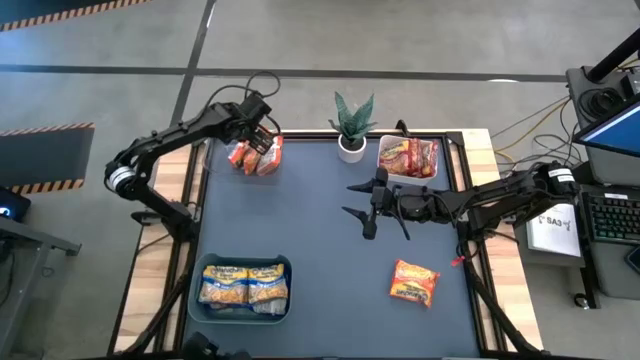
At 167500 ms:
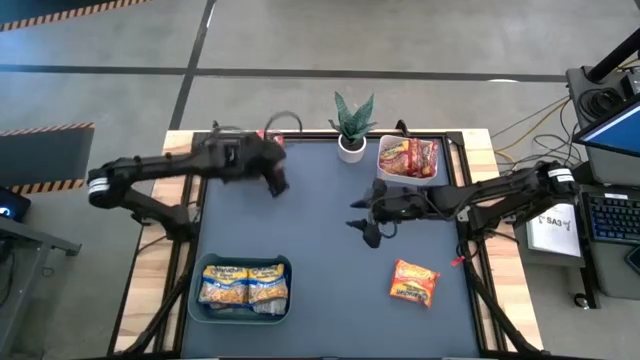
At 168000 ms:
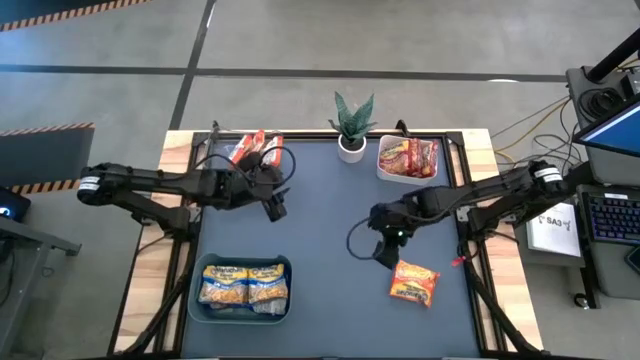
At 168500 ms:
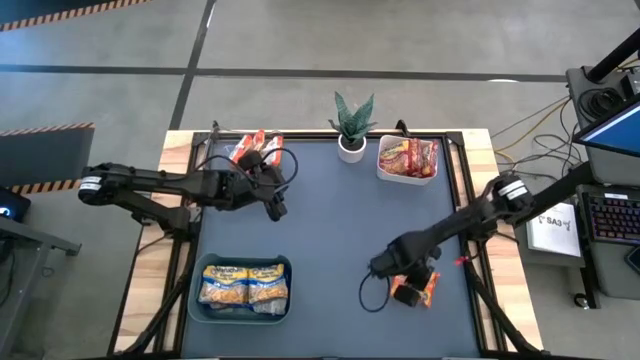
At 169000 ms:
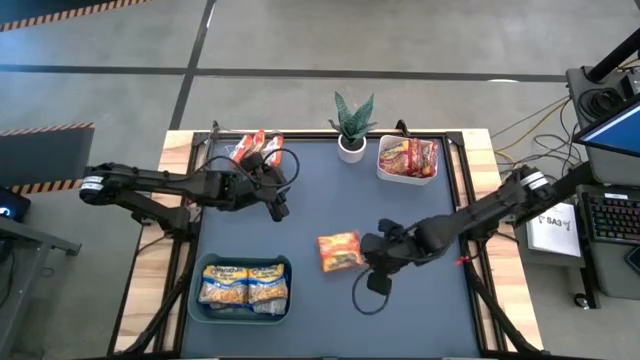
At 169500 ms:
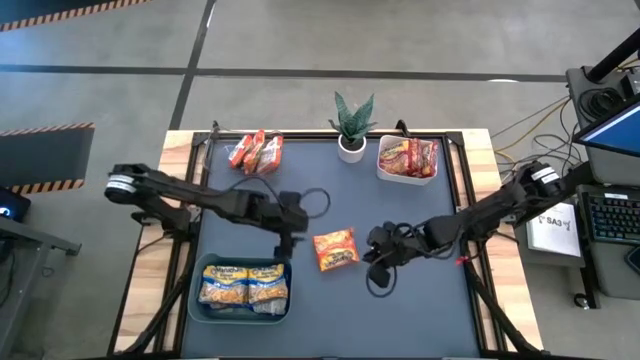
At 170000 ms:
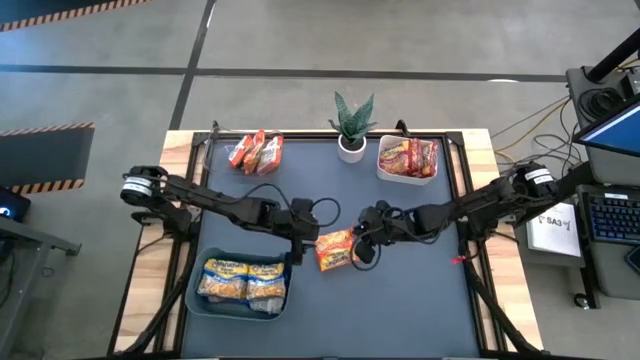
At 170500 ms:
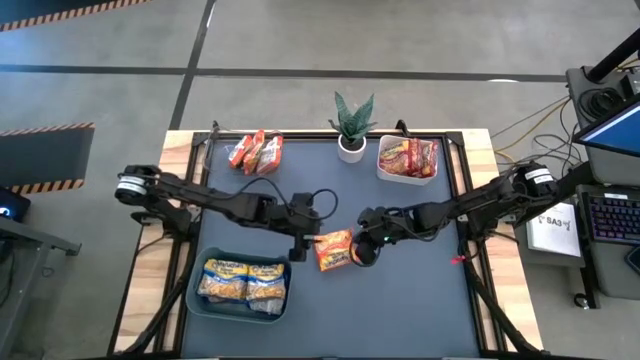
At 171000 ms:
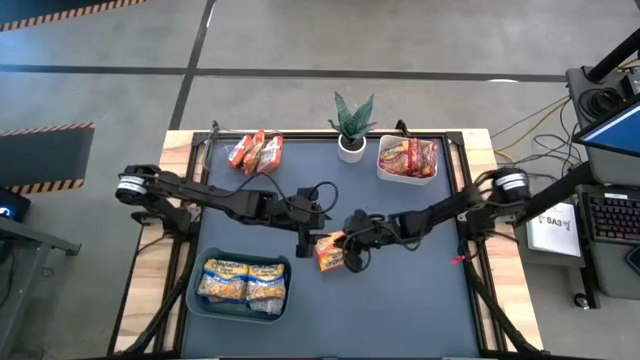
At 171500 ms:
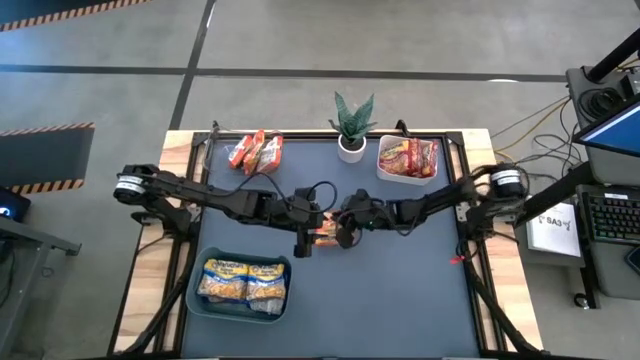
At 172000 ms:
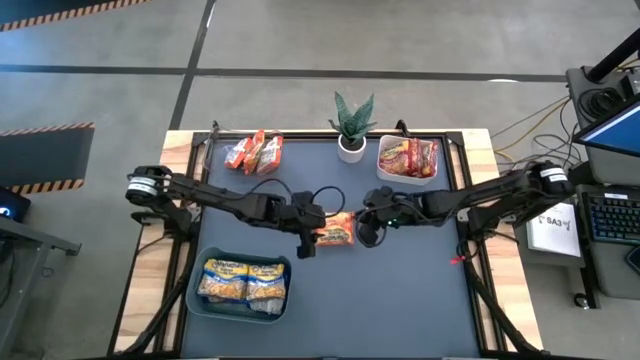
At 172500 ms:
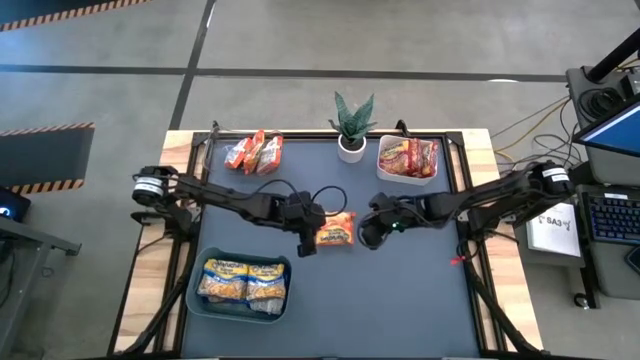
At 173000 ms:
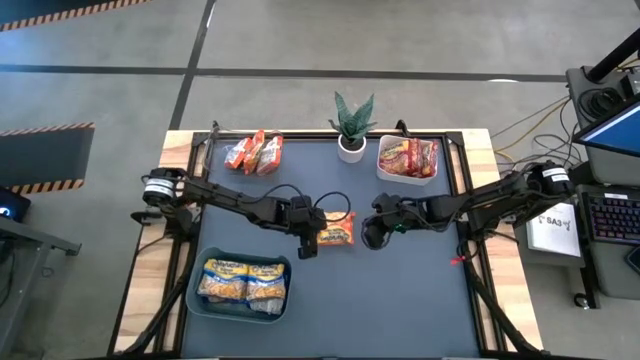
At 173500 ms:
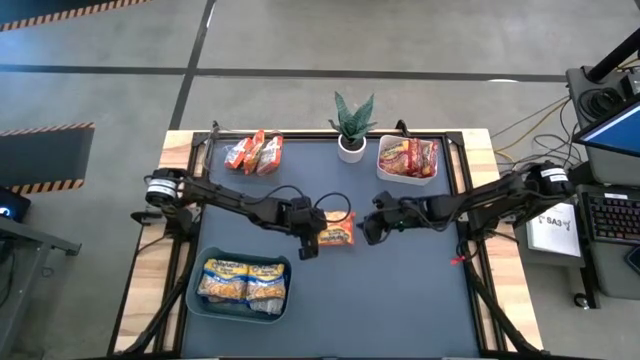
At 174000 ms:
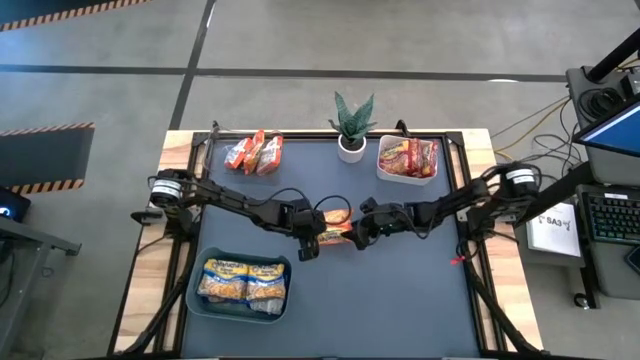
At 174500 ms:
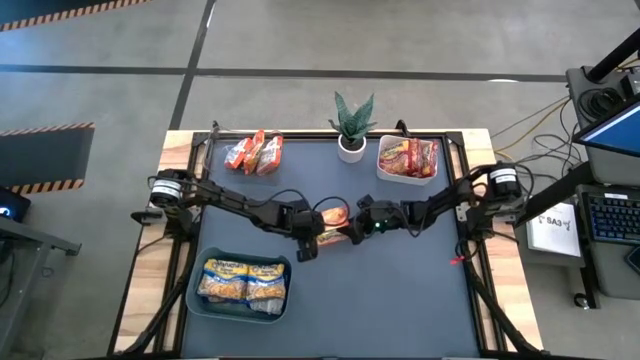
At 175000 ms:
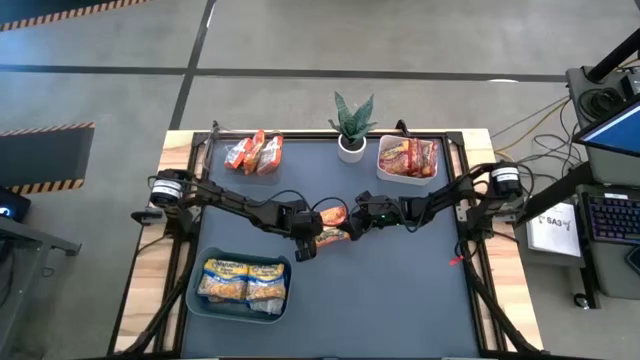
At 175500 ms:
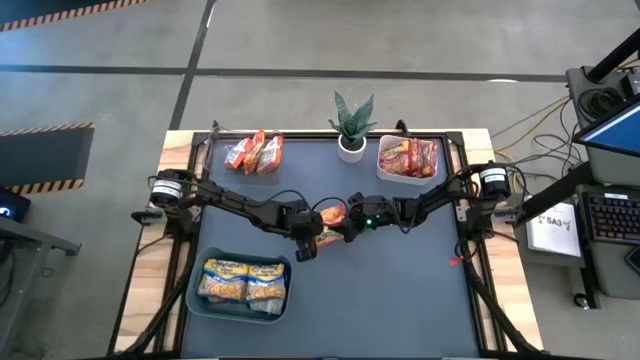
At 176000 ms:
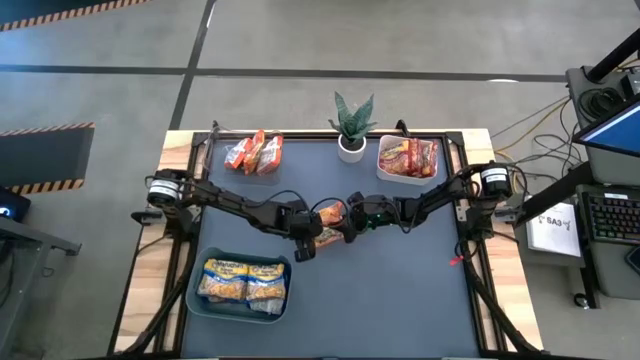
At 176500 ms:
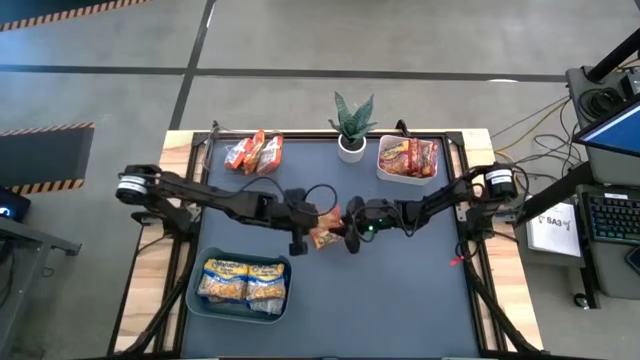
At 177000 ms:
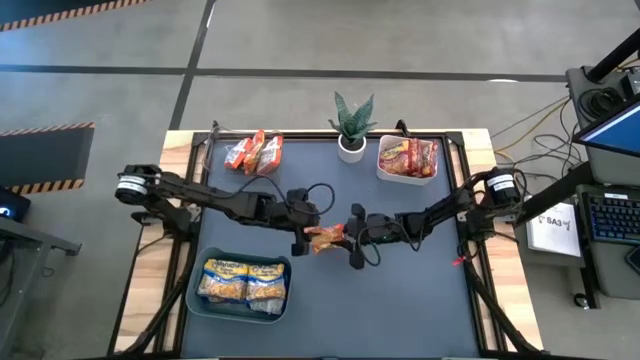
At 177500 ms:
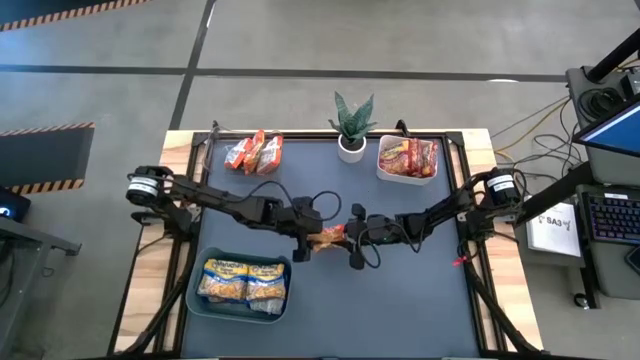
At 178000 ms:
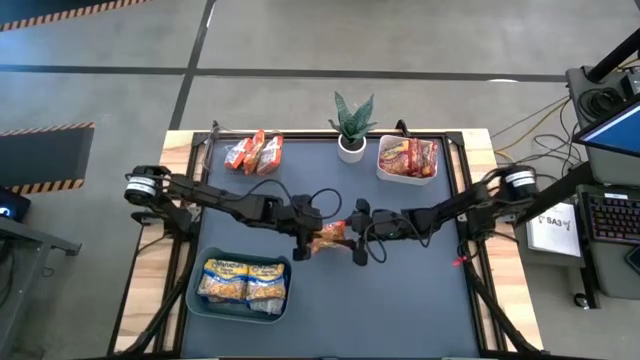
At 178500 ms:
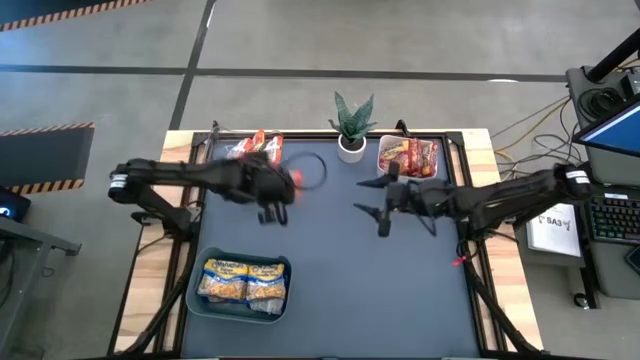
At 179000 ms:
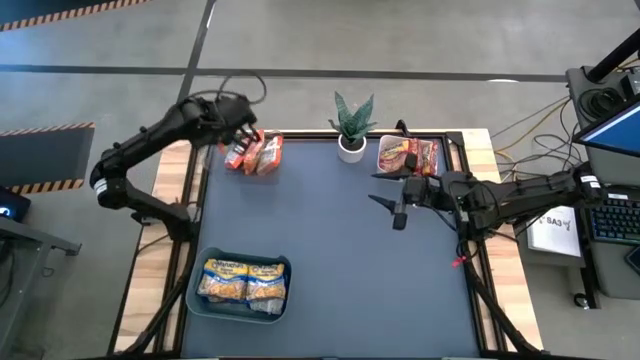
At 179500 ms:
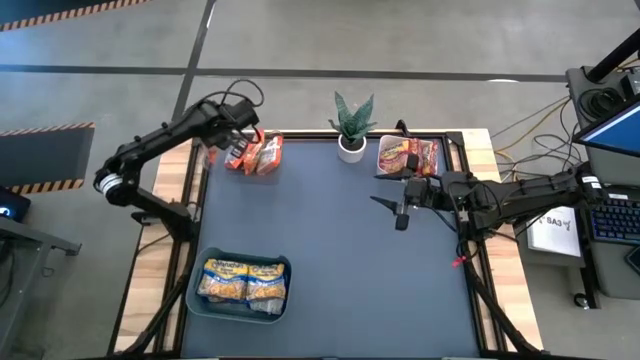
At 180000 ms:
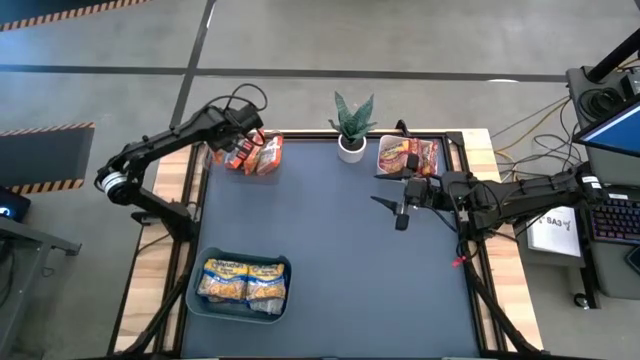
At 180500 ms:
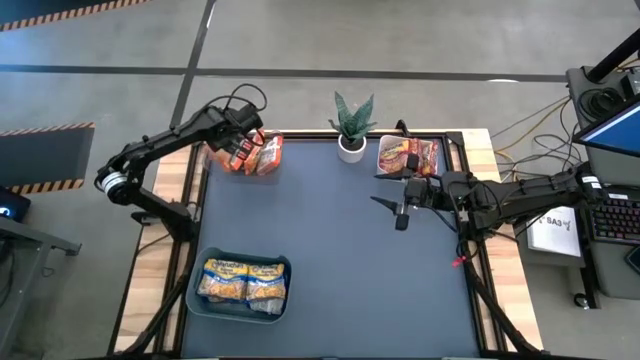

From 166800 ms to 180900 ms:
Task: Sort Maruchan noodles
Put the orange noodle into the transparent bin

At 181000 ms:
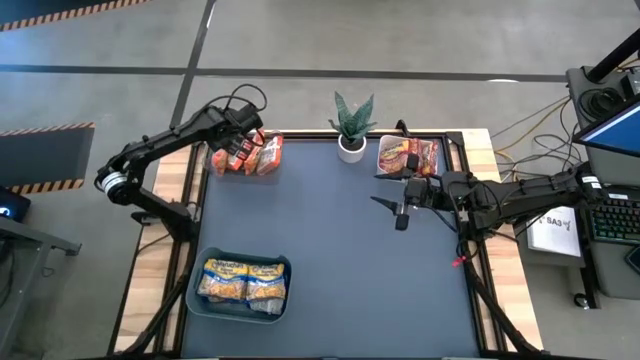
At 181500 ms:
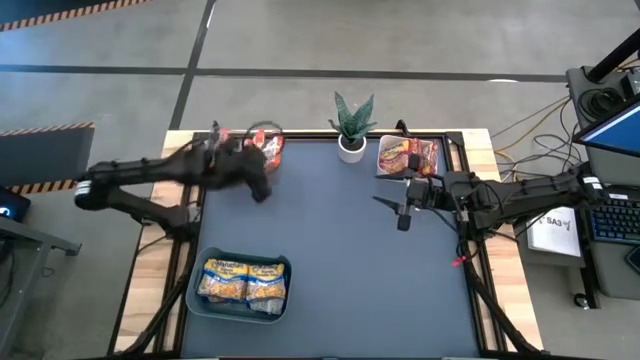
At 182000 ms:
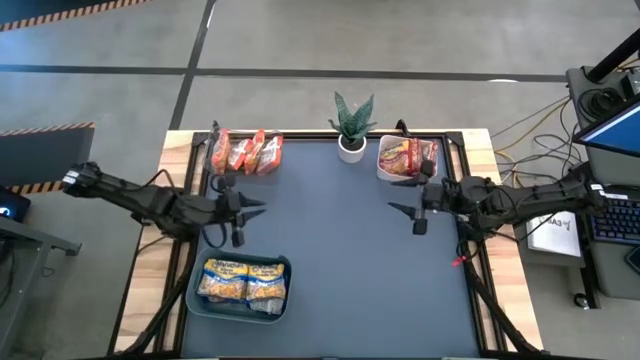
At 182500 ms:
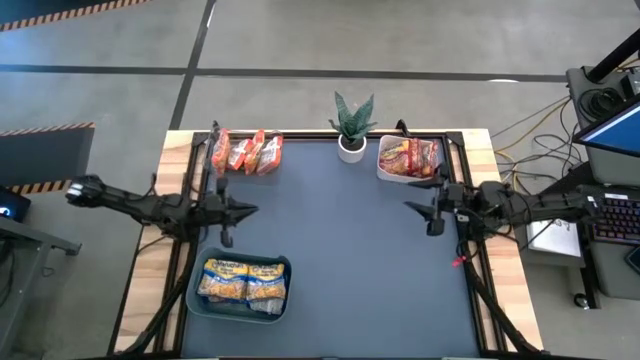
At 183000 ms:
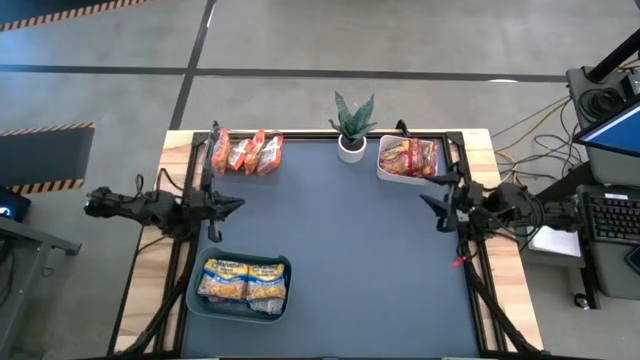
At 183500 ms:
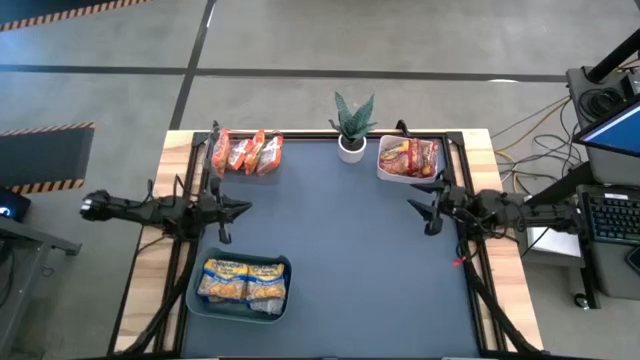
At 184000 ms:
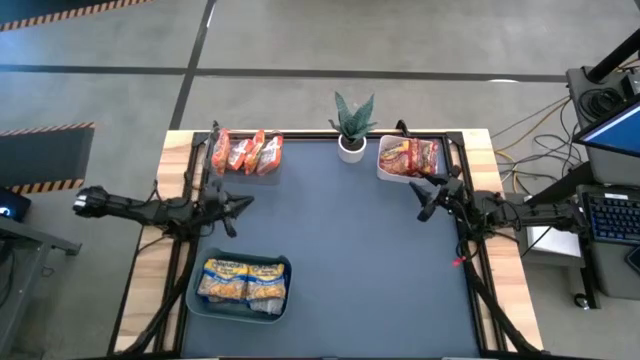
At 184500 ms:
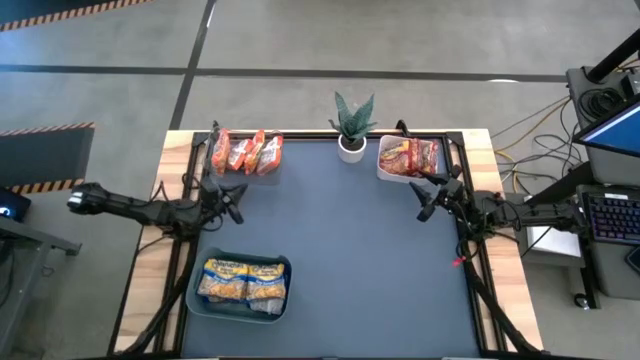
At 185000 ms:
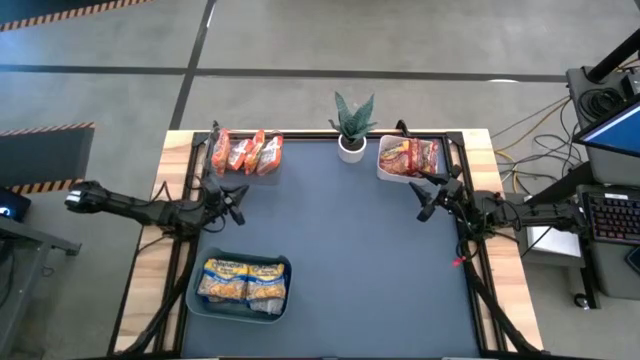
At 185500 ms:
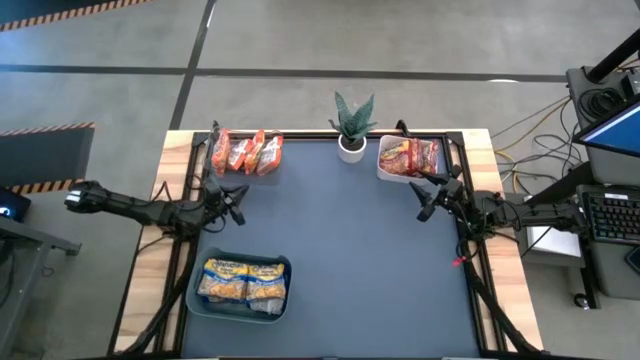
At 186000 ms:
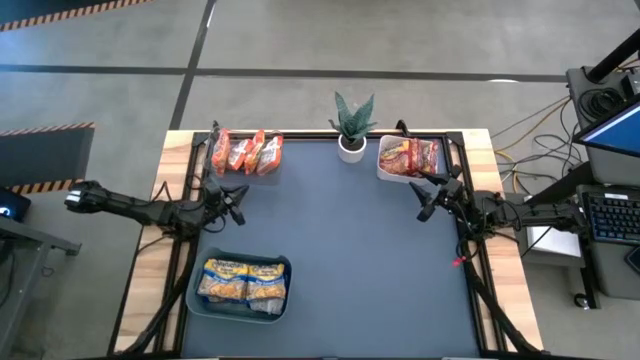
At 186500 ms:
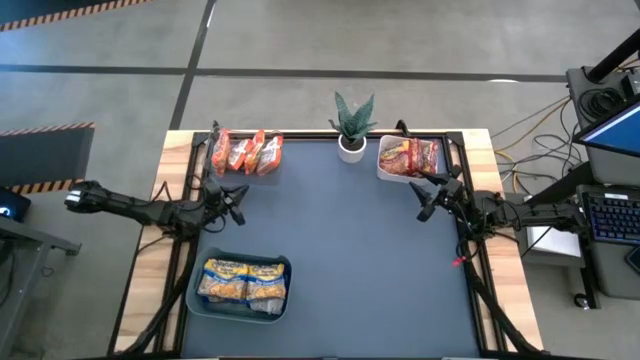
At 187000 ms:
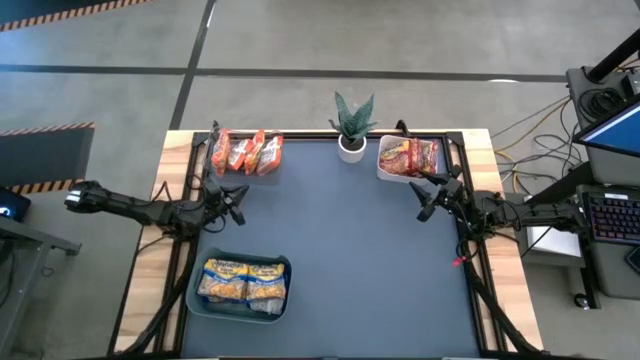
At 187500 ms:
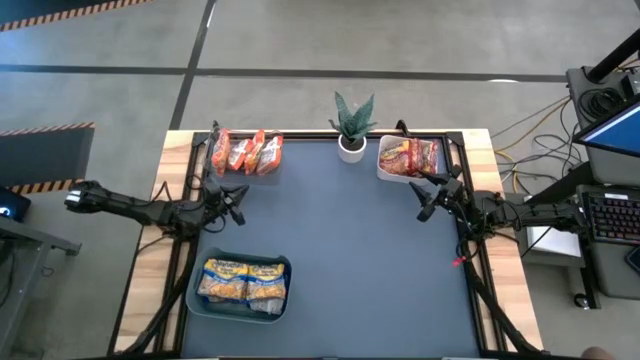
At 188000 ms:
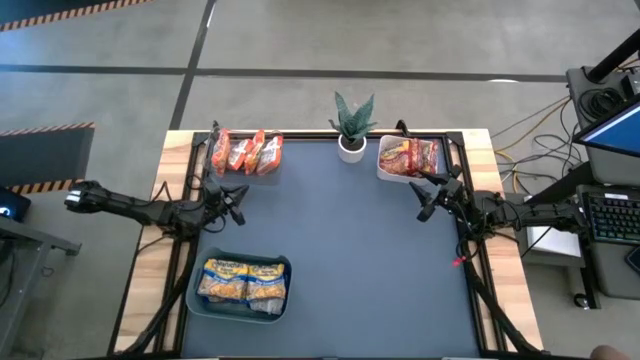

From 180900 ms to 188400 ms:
Return to Home Position
